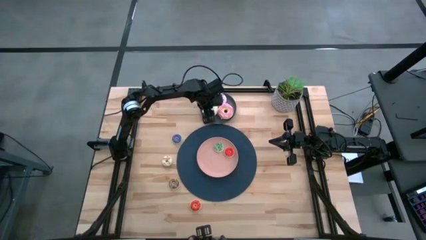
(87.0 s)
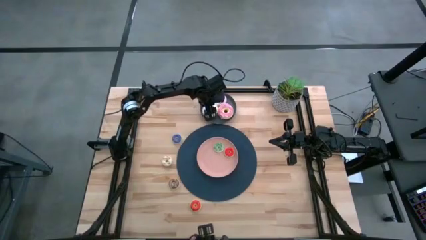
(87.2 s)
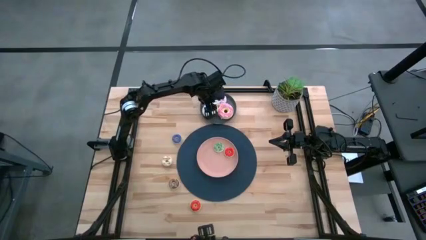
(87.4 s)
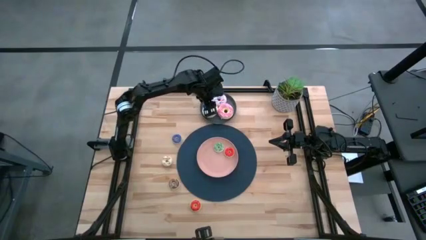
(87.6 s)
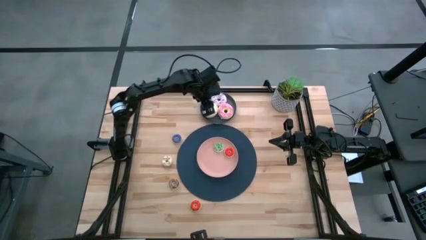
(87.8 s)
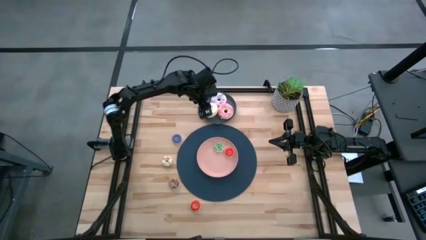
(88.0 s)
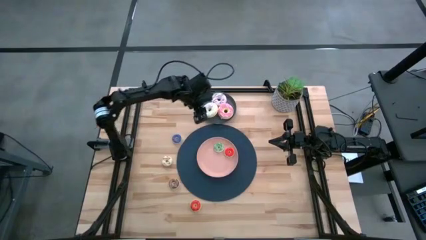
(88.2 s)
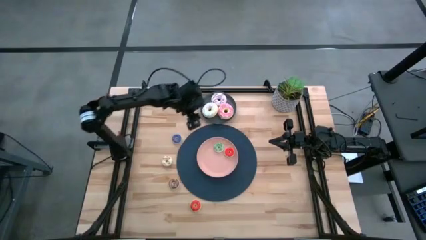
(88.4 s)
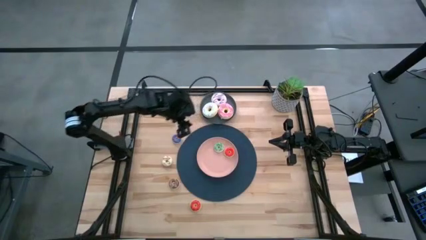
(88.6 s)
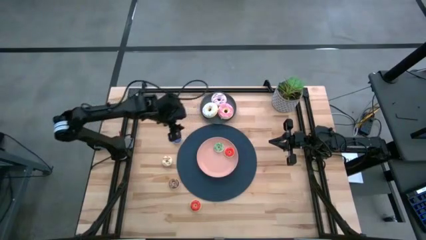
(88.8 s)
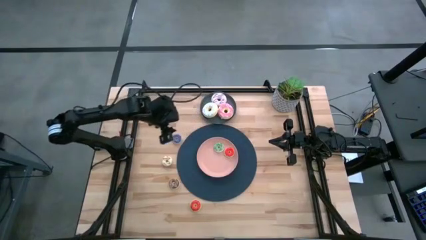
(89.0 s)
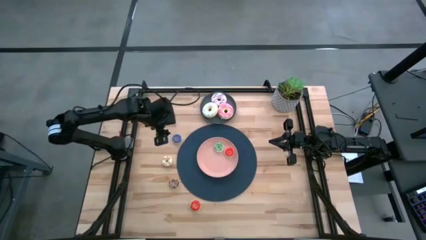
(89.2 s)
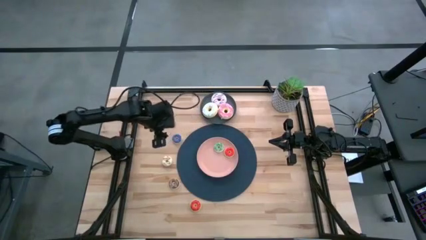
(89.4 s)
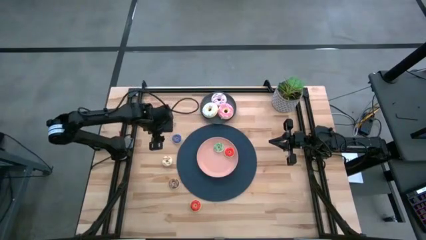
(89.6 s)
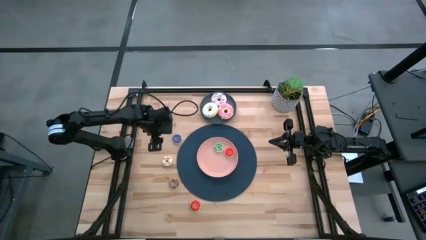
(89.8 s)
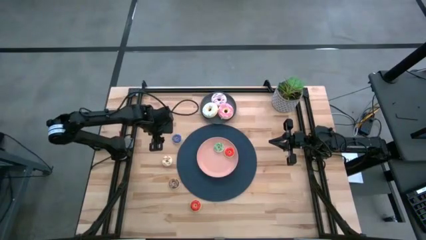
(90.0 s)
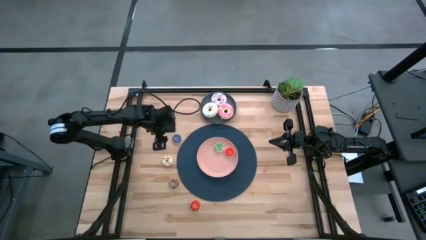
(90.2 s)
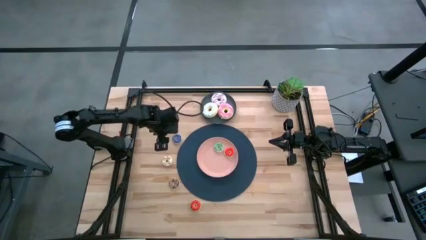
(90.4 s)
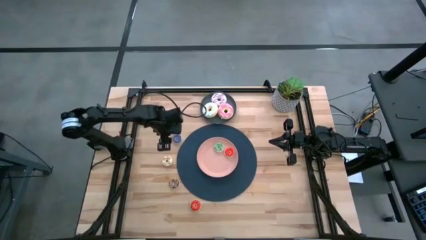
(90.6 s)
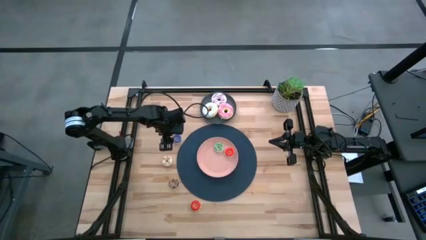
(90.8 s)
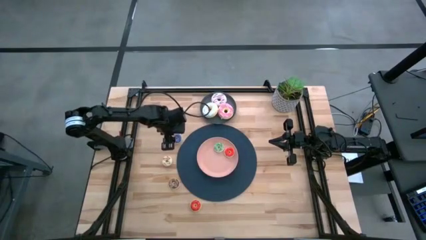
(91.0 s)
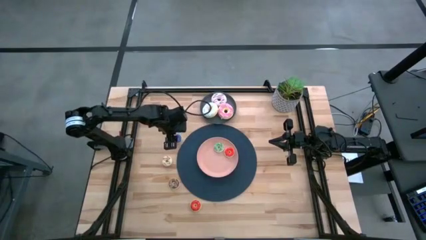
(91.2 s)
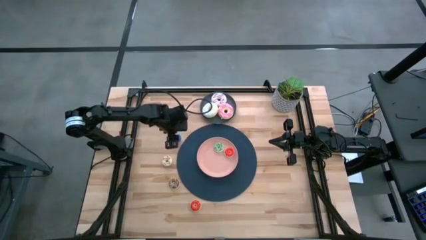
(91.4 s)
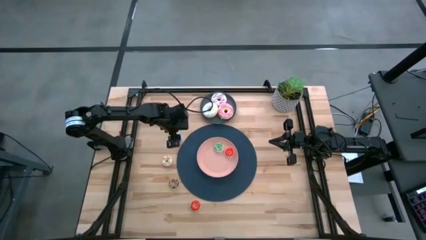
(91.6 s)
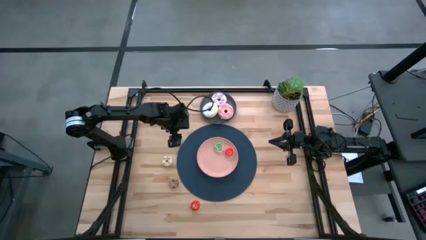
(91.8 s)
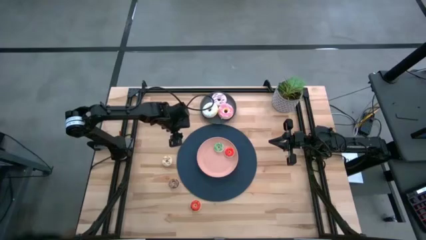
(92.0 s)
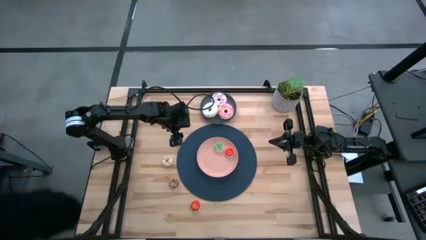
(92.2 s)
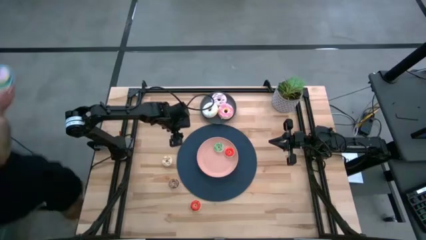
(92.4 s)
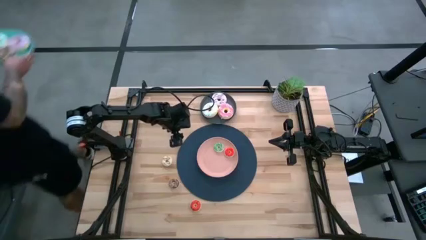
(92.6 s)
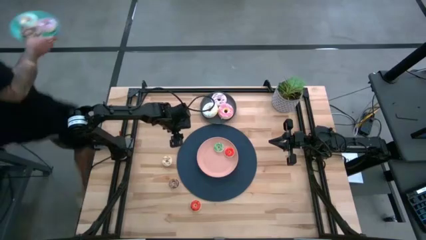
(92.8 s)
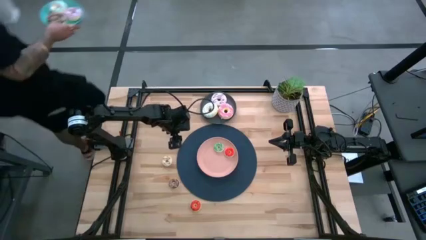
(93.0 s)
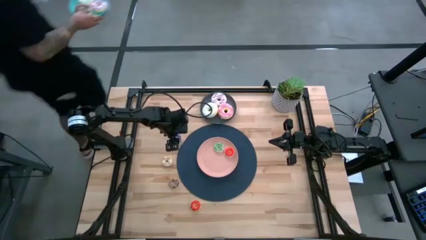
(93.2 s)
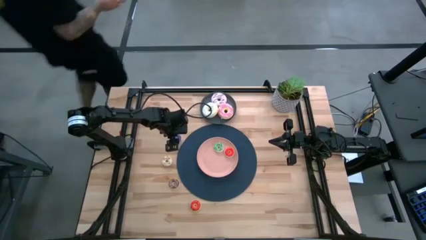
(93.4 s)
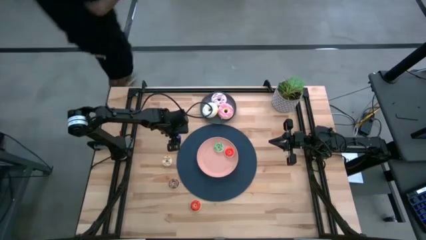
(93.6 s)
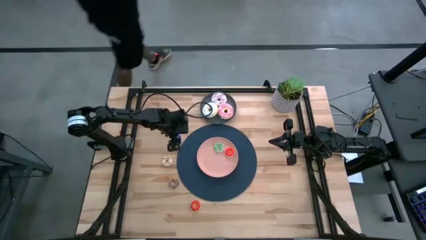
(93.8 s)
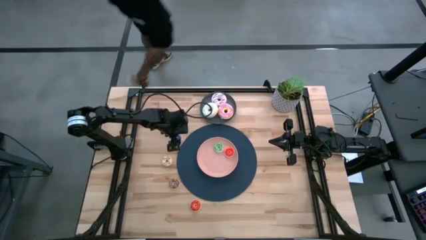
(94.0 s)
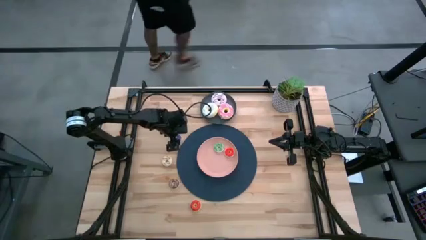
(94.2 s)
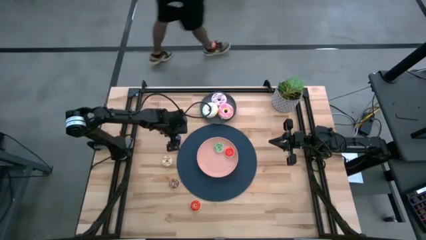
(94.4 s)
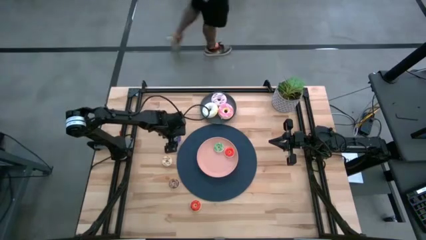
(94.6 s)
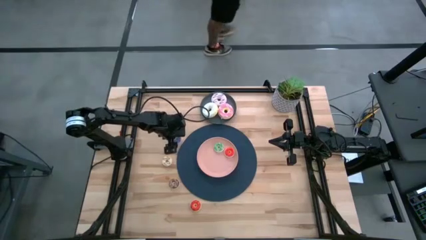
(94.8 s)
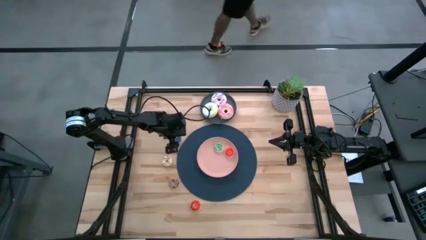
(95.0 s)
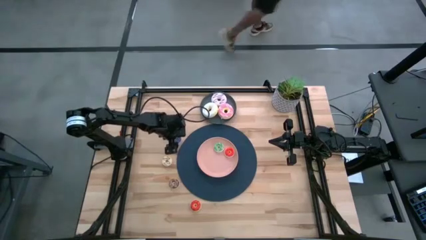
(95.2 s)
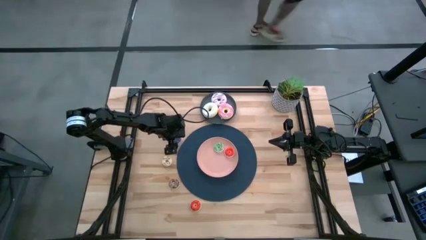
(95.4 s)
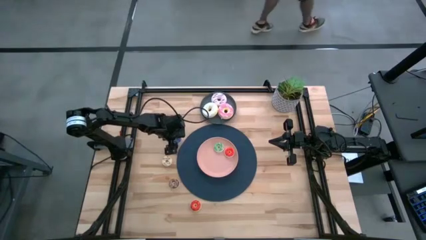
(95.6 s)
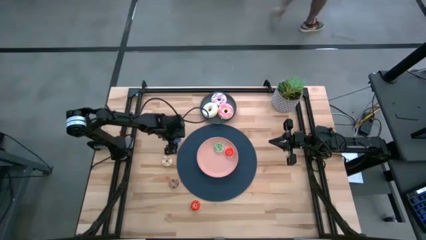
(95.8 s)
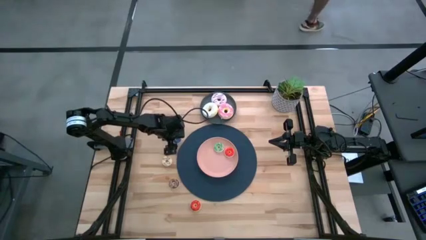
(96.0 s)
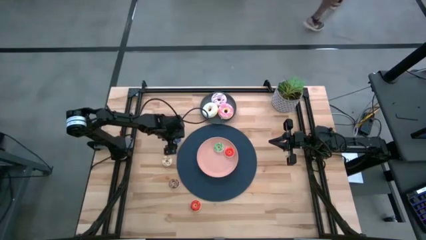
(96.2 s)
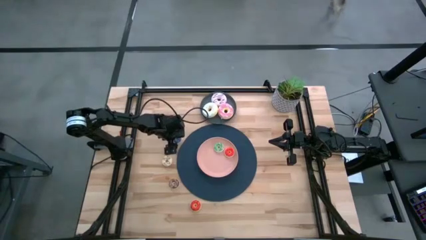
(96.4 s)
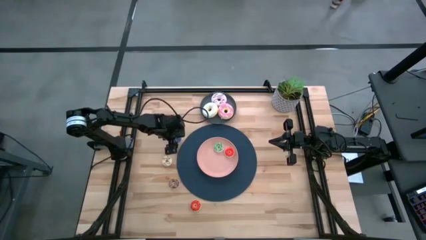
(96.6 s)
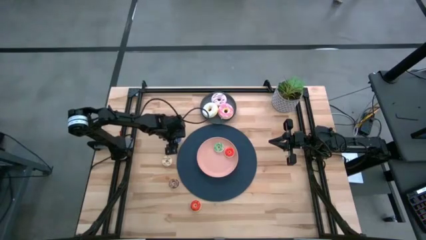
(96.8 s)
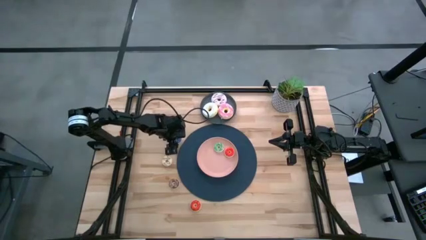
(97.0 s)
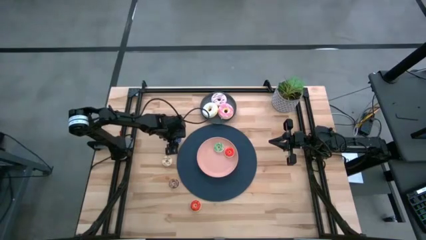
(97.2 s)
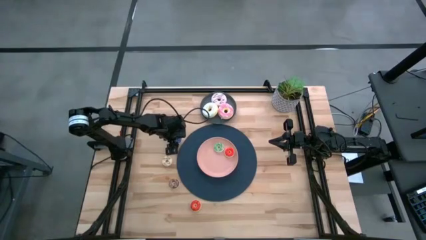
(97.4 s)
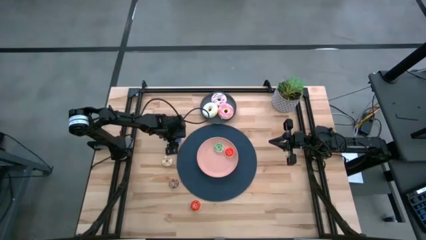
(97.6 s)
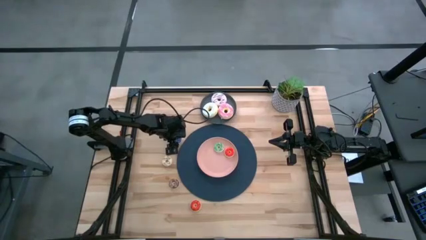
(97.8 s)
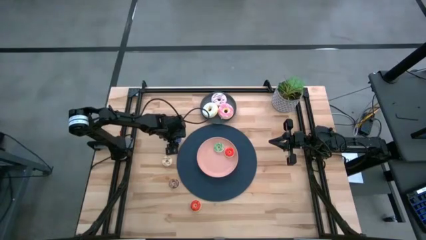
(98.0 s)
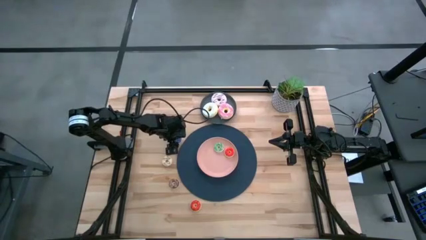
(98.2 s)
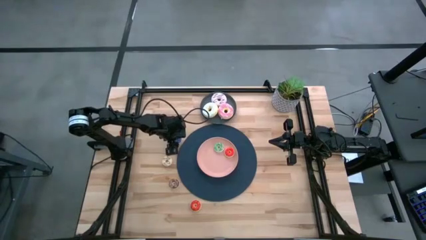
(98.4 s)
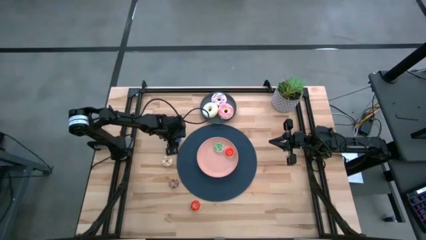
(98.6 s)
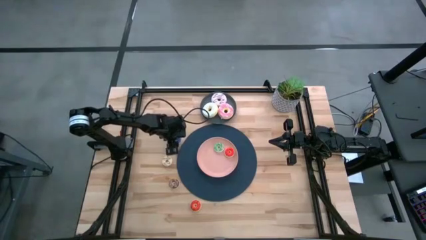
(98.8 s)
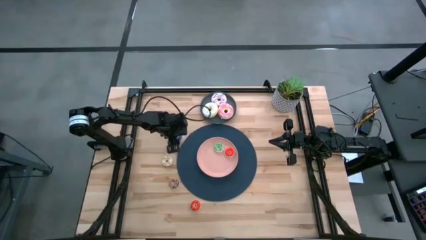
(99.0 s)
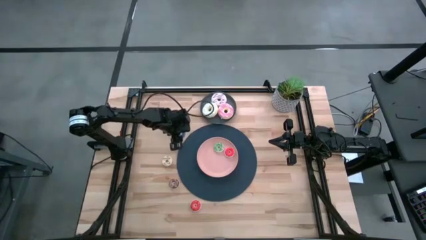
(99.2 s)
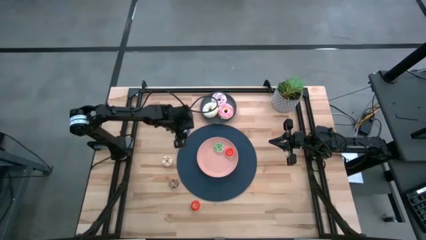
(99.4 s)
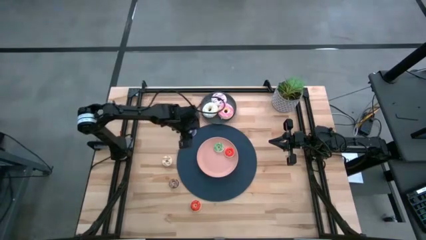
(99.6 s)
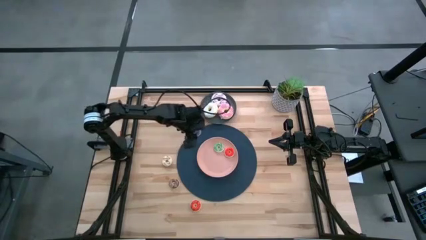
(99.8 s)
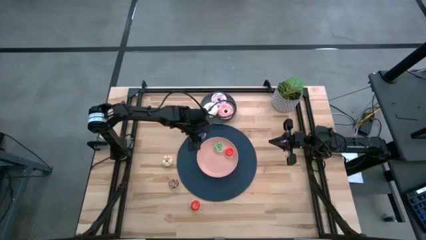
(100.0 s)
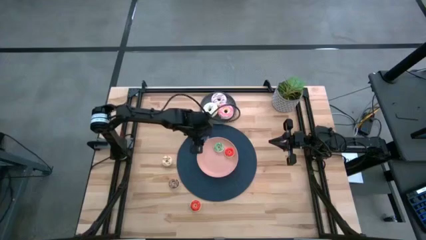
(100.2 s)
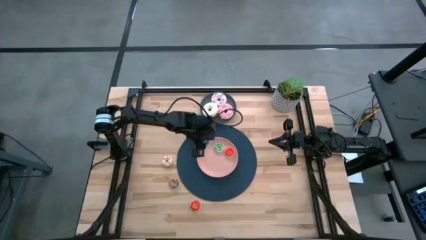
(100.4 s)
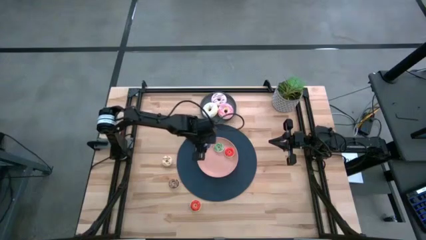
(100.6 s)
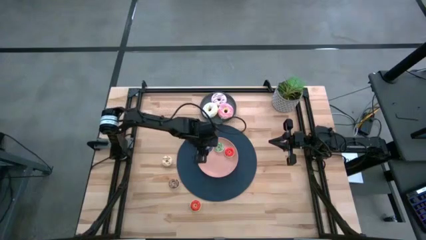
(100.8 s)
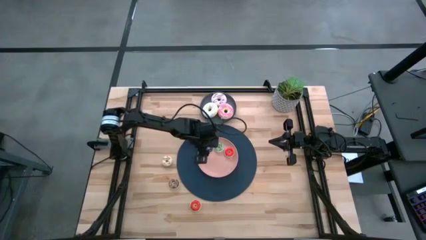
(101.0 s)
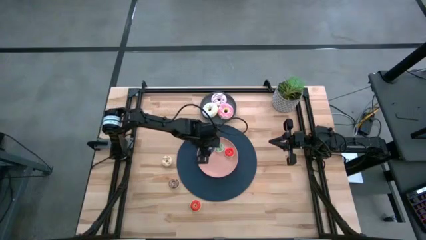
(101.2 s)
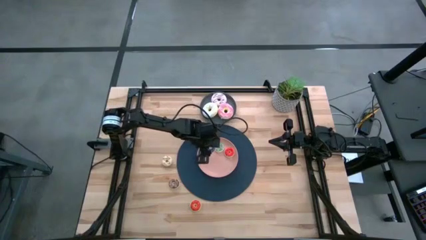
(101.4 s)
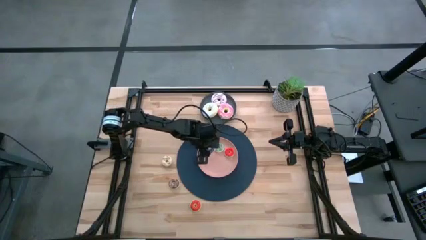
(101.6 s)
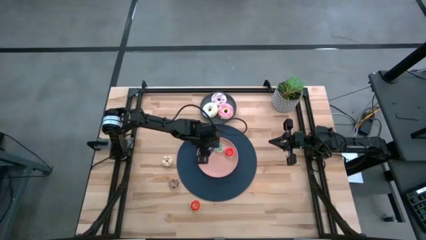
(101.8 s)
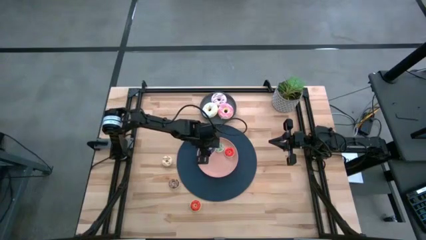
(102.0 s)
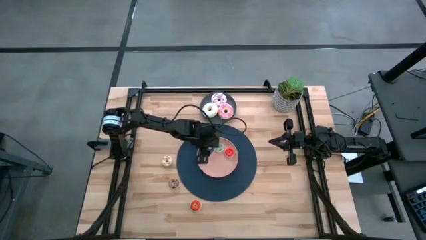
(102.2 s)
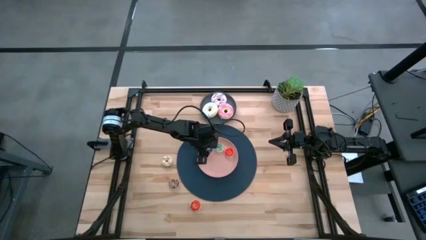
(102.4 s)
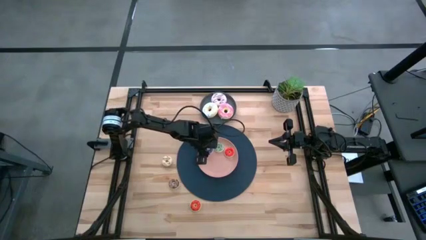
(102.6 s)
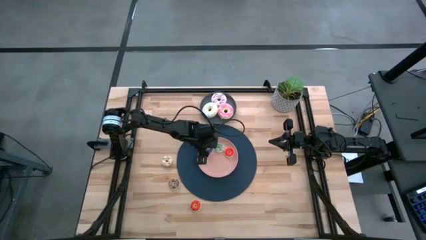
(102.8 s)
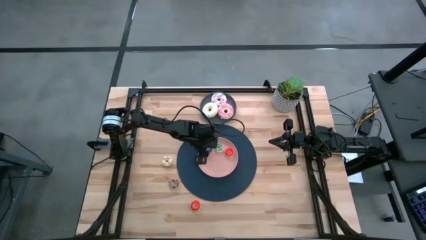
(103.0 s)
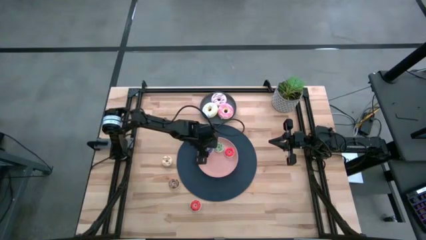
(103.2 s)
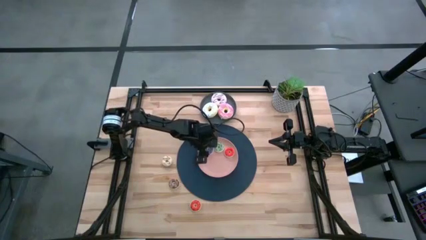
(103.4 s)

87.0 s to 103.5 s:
Task: Pick & Place donuts
Put the small blue donut on the pink plate
